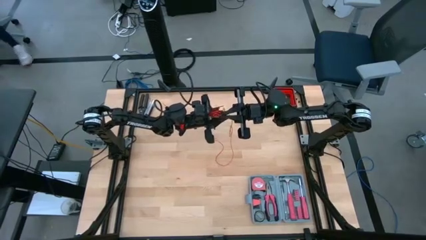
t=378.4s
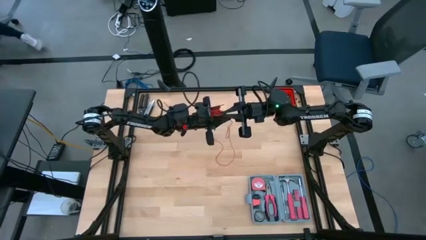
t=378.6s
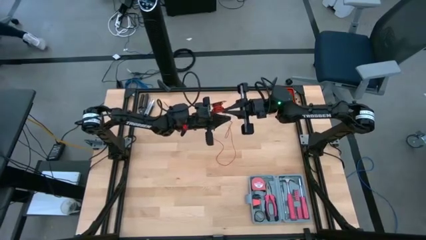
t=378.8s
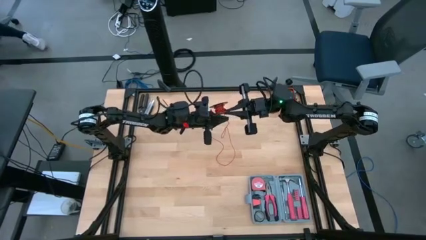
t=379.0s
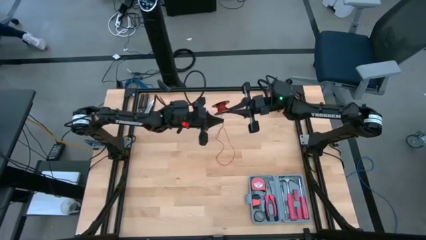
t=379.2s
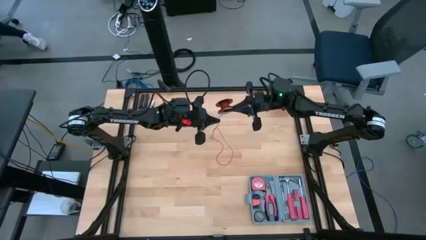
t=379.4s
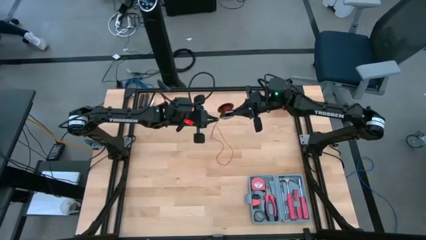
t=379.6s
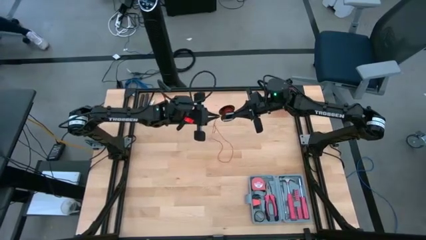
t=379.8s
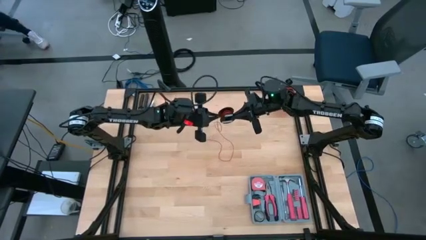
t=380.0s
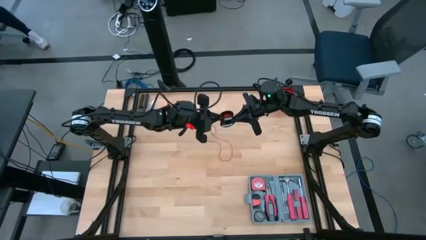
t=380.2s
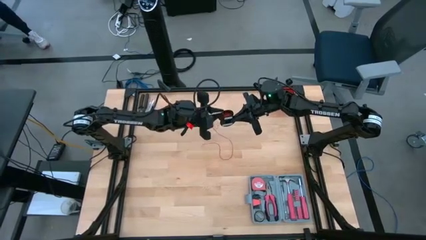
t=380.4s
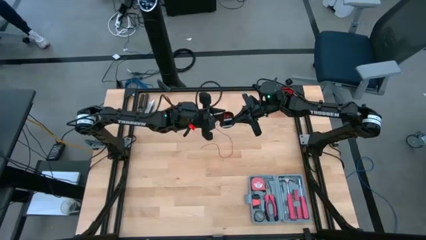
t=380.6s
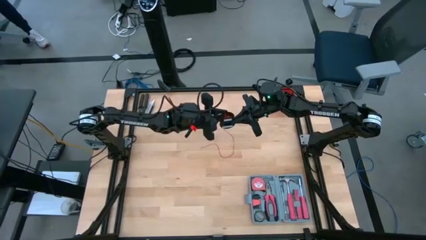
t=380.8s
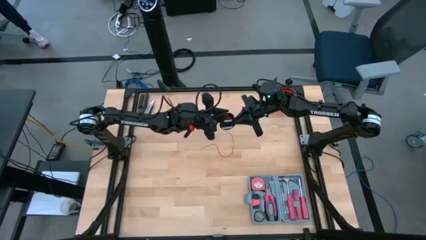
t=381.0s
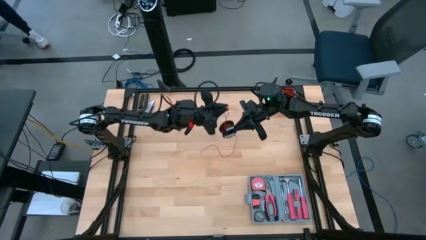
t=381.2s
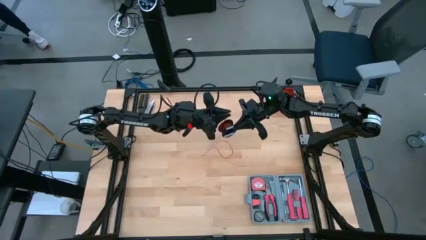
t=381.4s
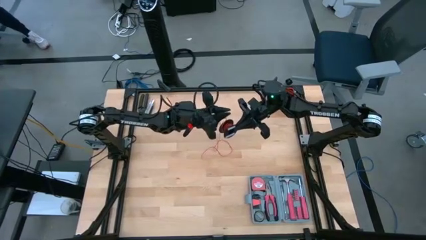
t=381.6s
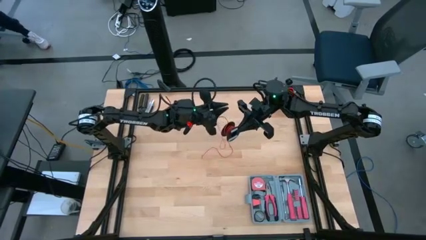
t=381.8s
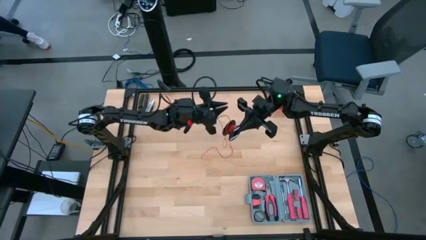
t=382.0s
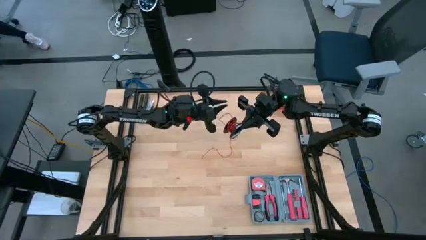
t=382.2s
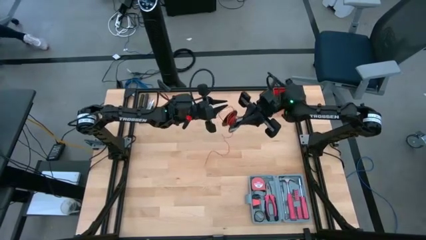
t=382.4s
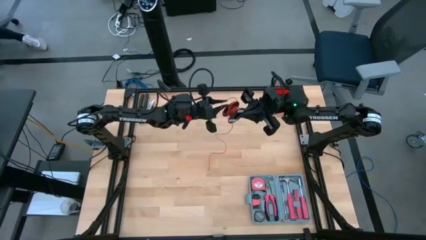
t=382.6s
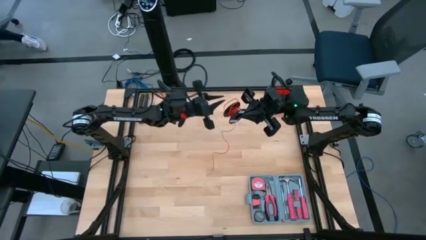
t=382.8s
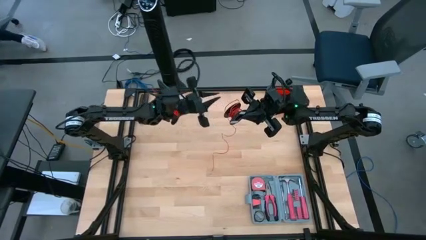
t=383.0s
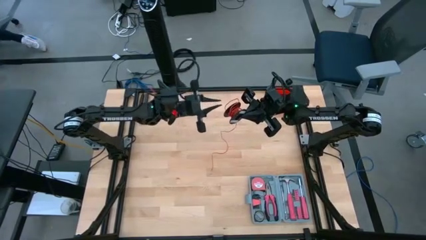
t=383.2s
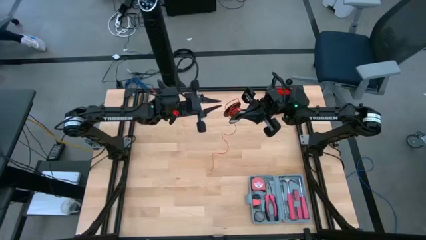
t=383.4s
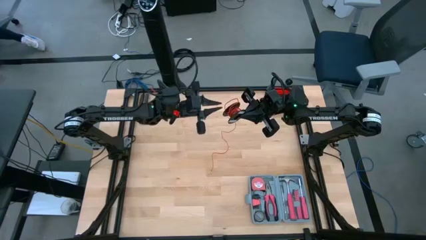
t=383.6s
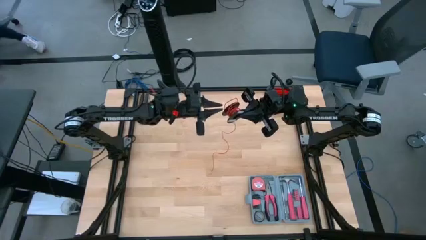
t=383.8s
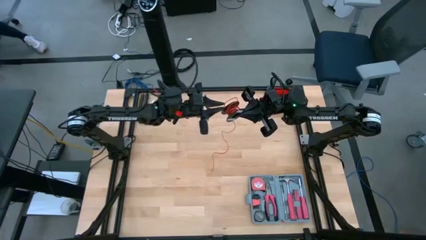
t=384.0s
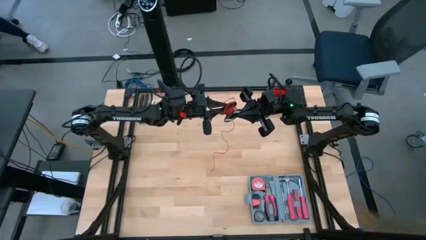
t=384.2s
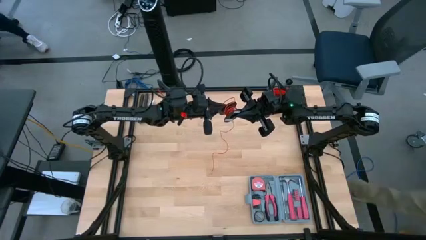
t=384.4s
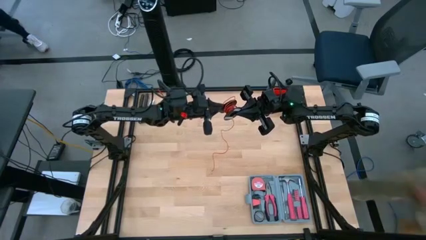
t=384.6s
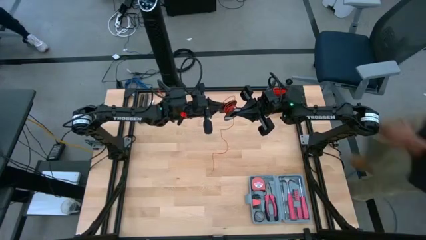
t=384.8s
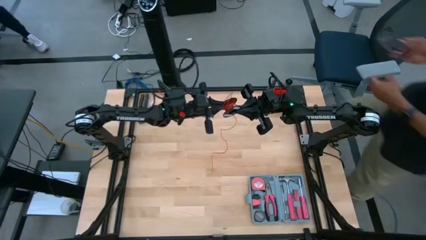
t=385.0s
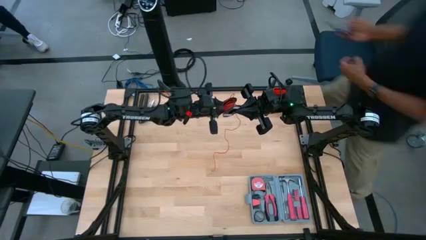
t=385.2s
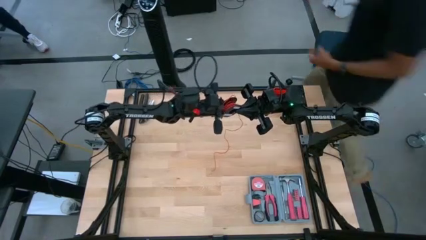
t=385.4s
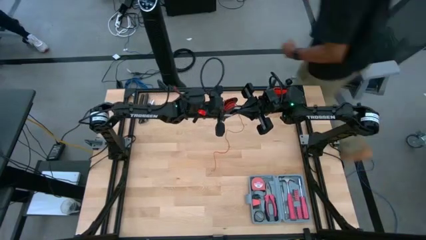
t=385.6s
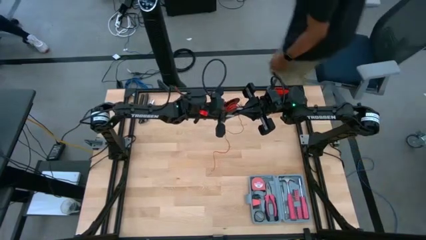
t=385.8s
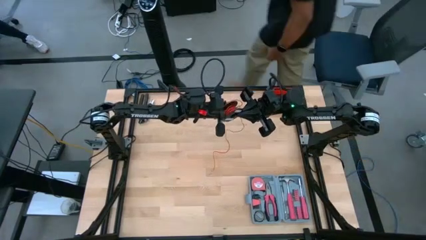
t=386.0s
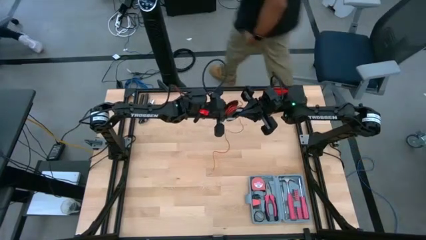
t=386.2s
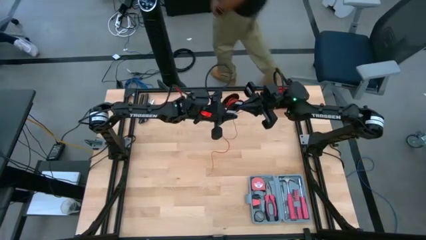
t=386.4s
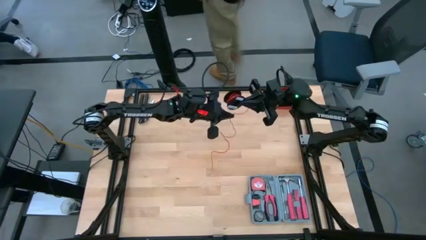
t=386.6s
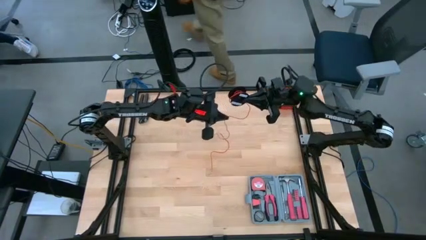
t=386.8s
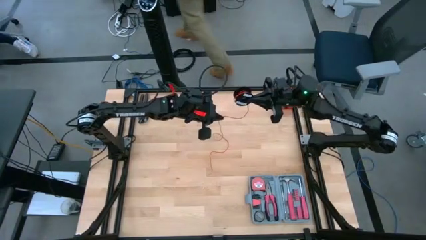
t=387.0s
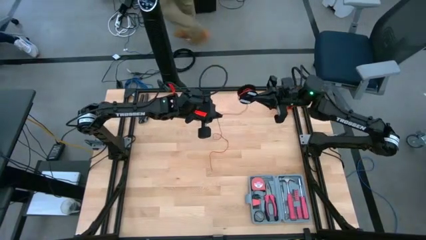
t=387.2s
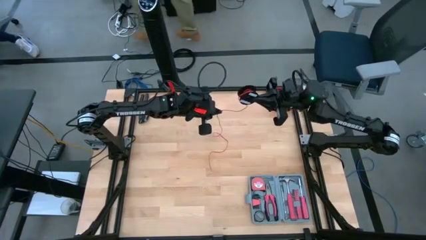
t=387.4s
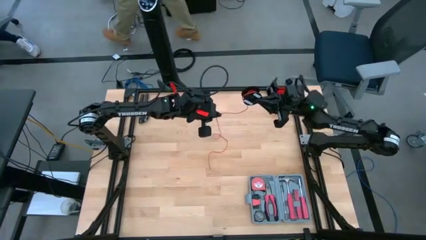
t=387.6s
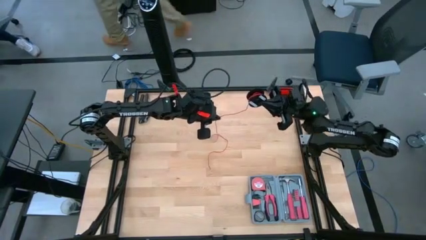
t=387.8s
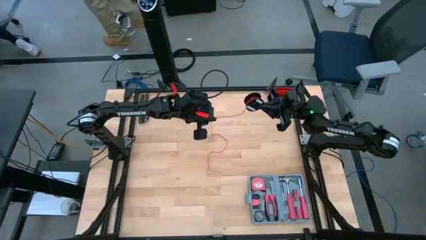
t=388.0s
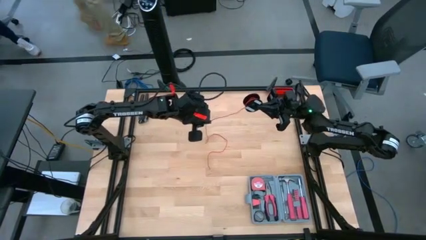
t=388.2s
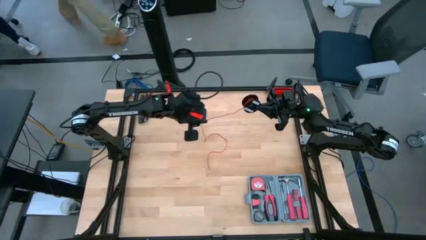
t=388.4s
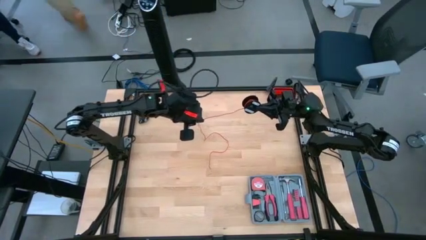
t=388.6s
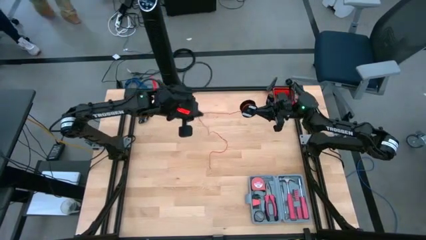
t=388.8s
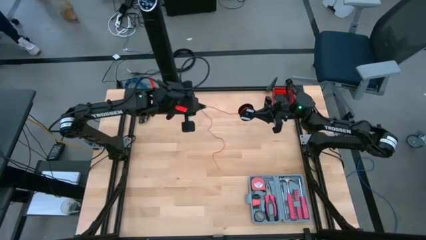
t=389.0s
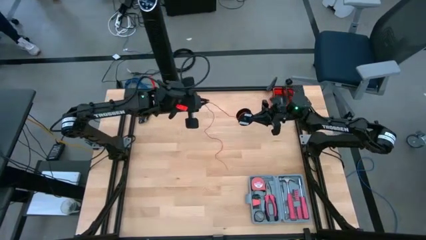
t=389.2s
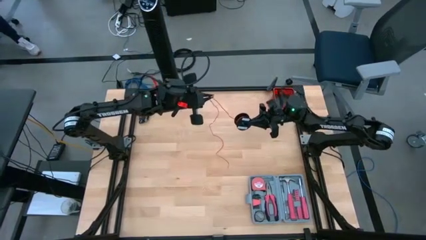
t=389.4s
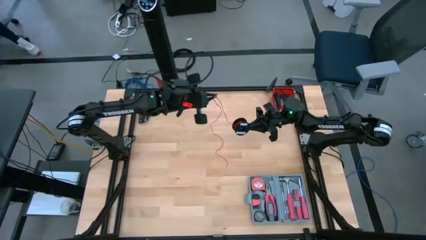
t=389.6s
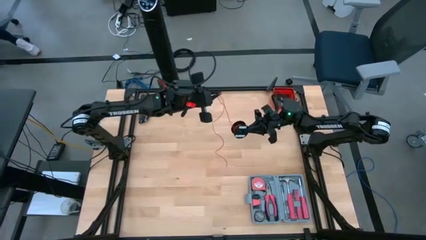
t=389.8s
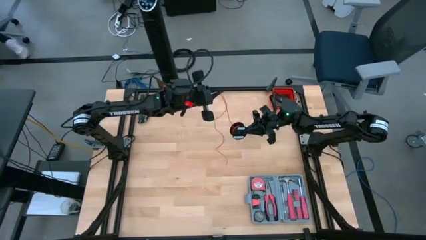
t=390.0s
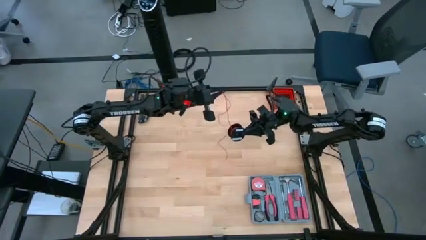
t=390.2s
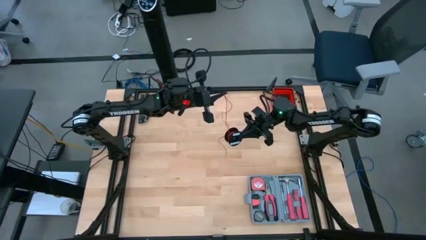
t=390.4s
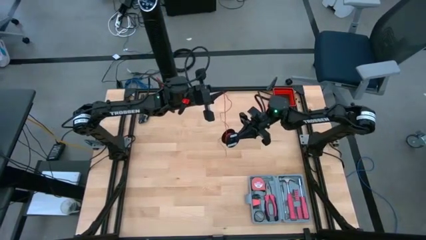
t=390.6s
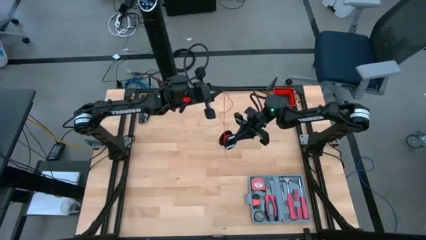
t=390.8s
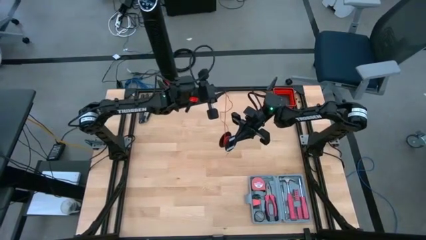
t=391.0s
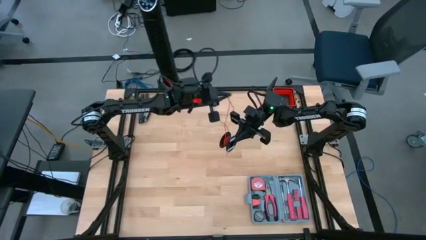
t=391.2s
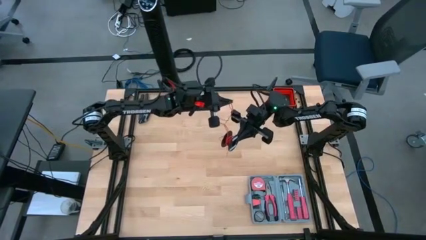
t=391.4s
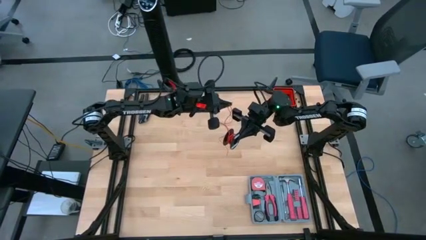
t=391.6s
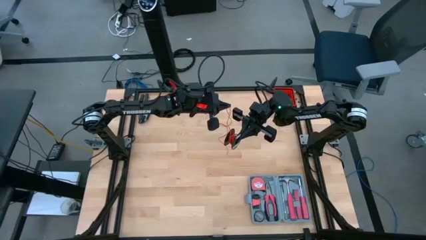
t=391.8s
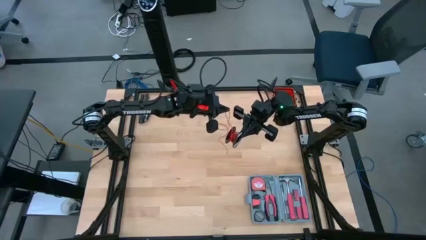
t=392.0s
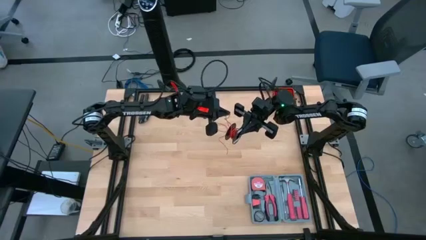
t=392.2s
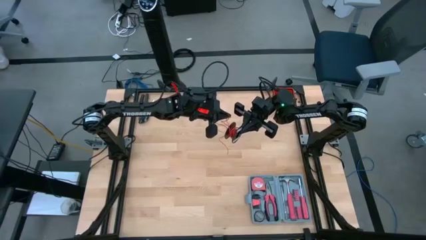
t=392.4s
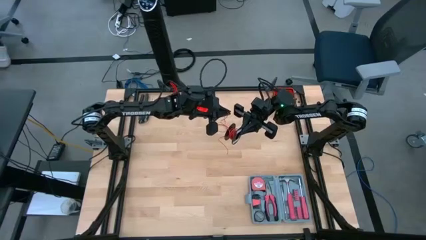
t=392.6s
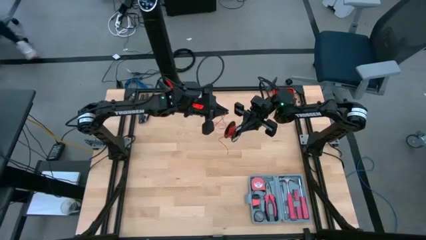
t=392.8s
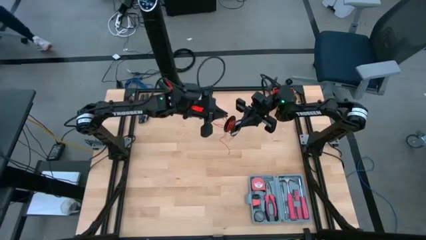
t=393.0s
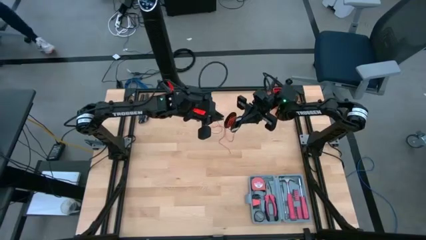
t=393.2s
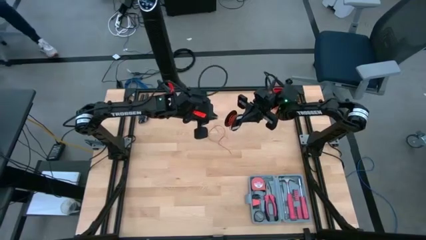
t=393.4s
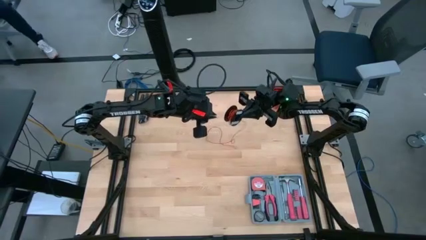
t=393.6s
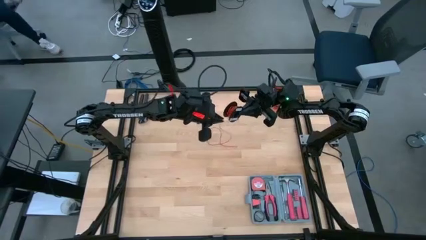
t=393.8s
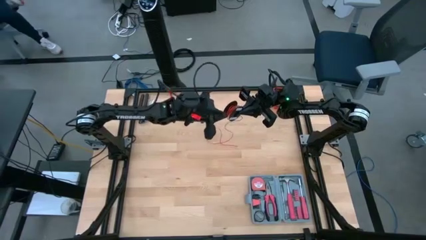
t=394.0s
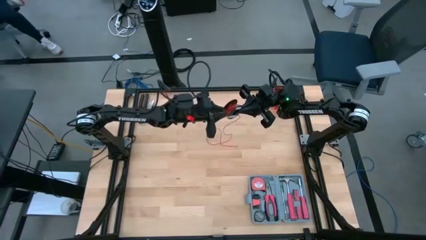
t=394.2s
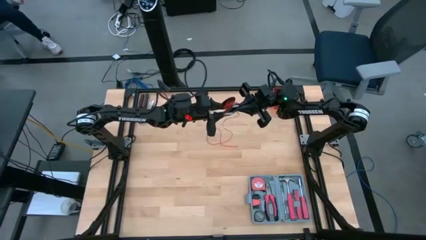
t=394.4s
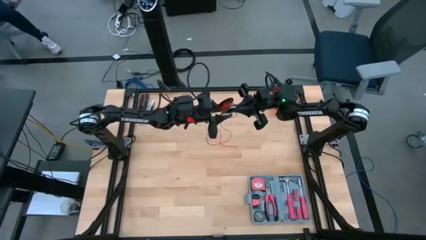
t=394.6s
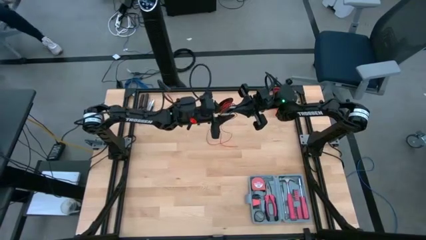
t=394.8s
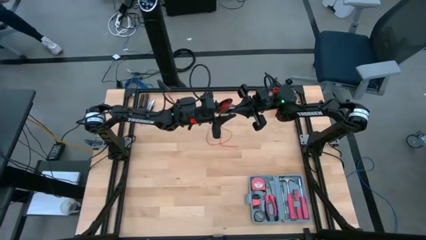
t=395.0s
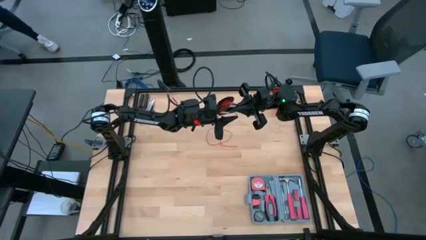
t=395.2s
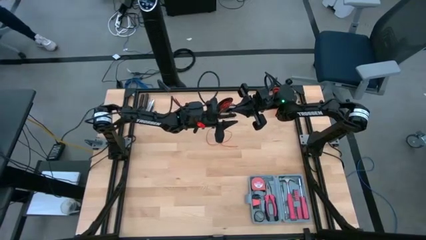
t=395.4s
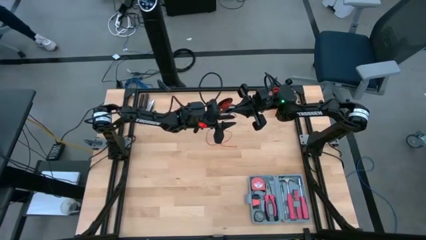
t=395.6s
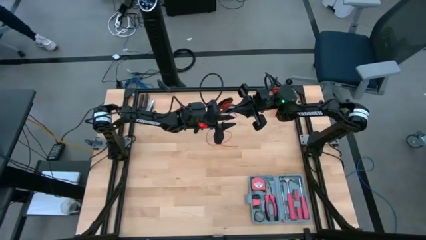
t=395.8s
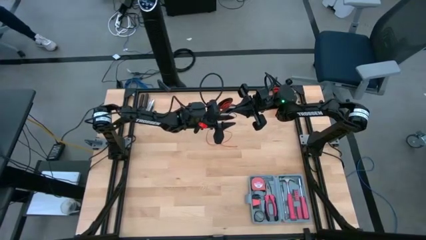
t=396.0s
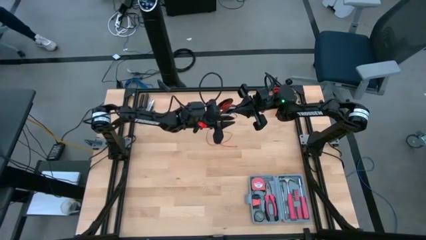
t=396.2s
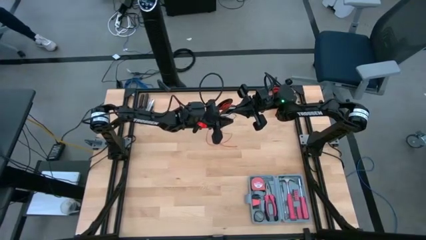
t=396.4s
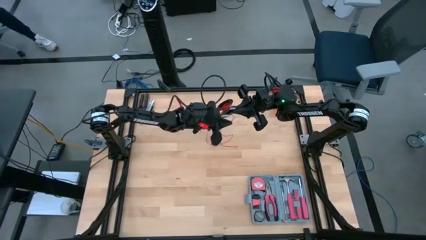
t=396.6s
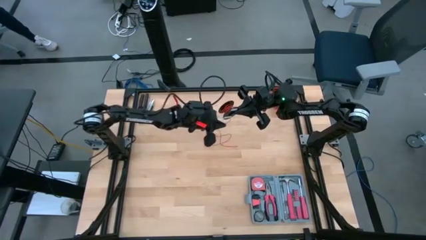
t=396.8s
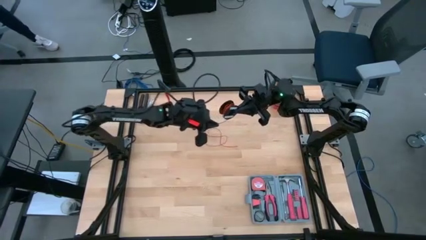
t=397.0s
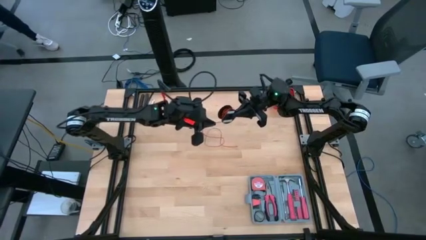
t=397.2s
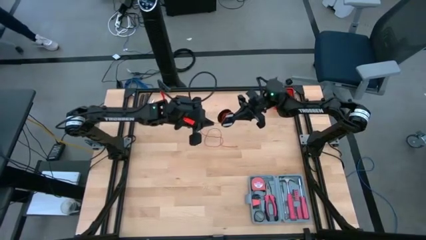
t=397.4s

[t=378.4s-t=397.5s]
Task: Coil cords
Coil the wire
